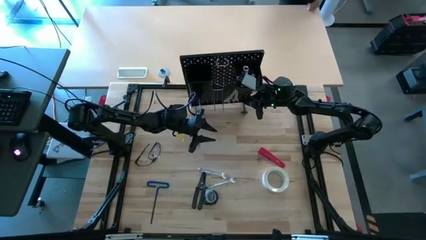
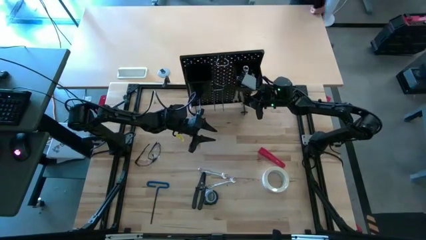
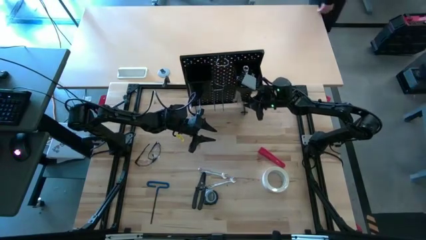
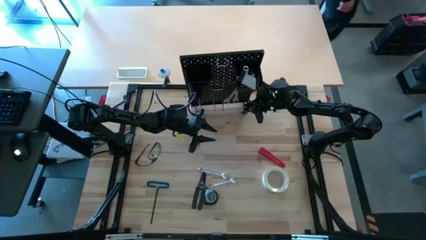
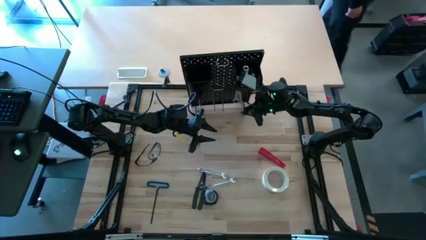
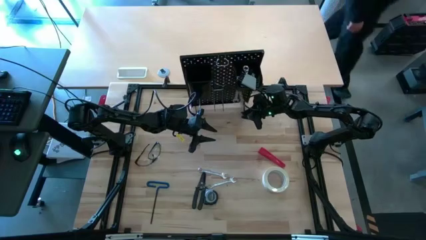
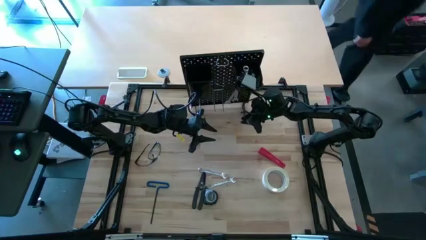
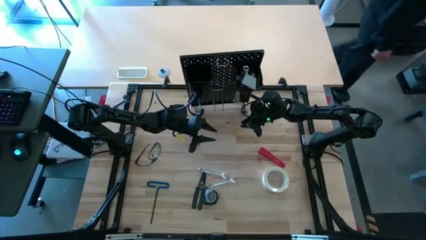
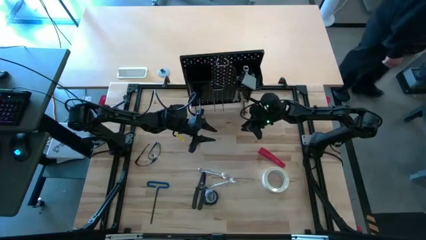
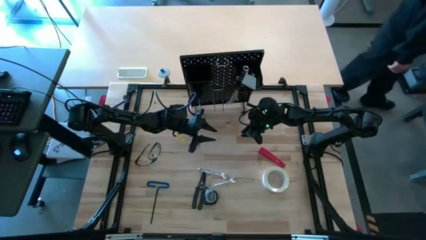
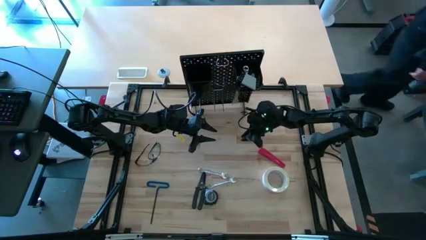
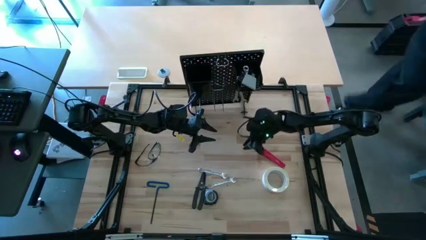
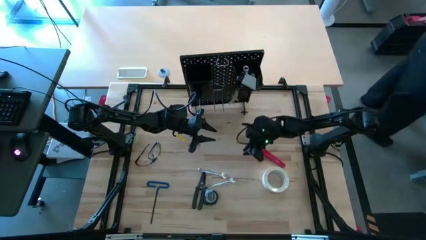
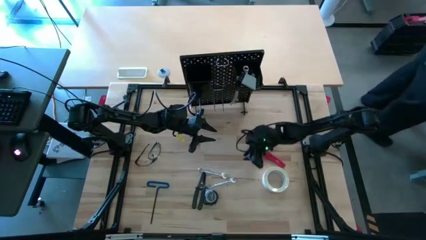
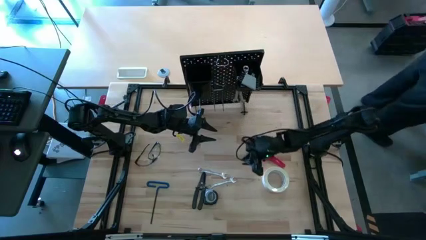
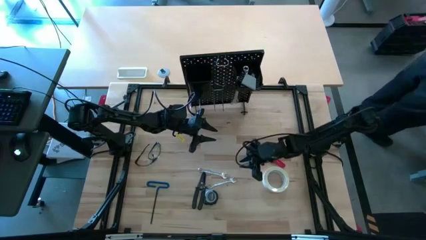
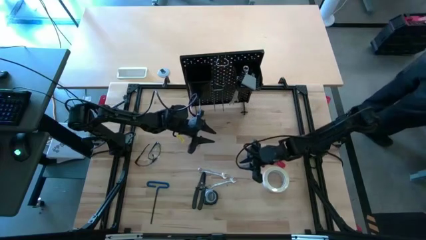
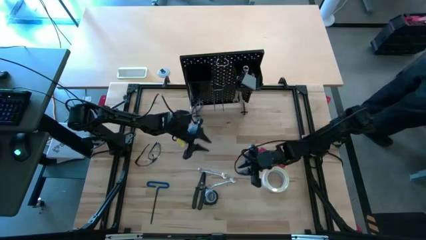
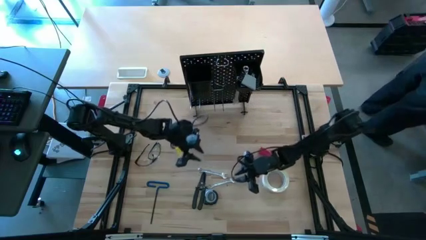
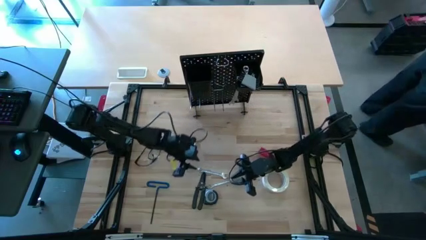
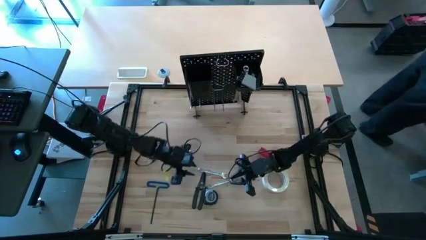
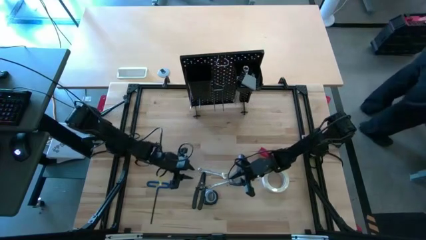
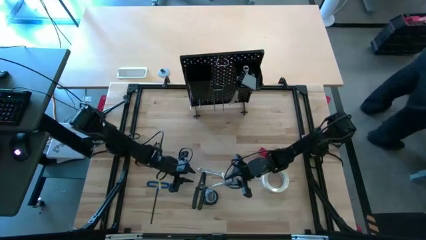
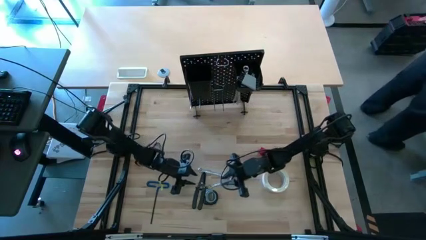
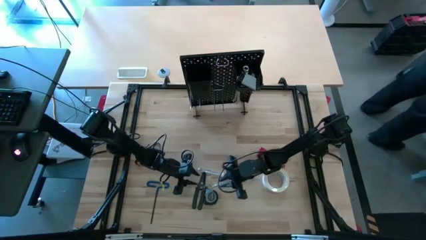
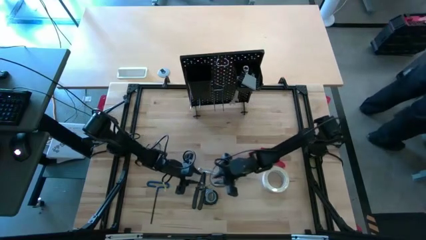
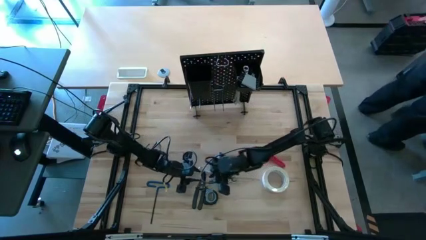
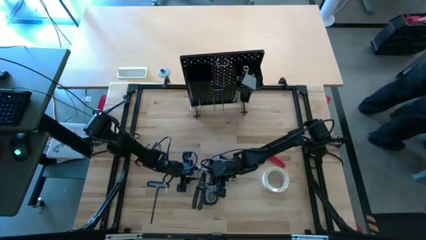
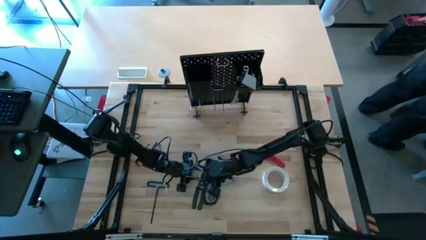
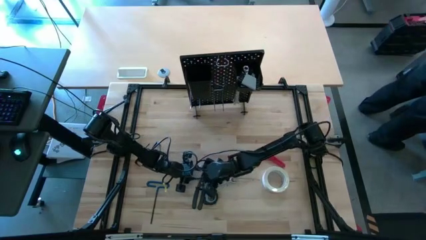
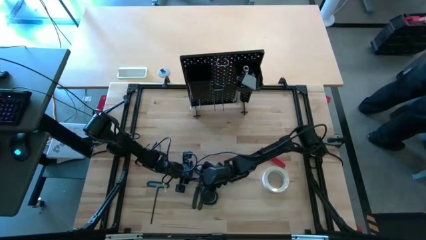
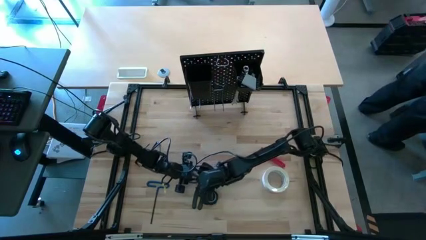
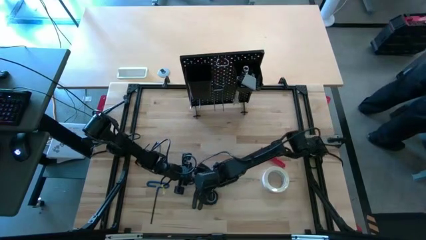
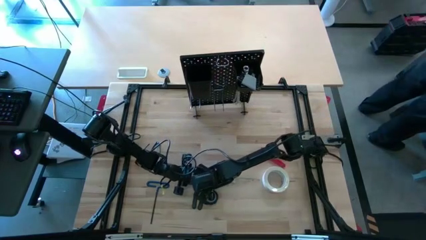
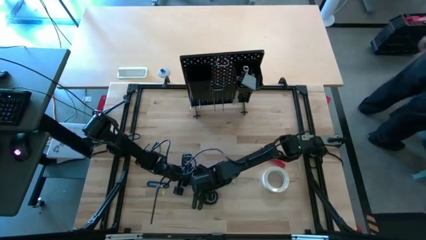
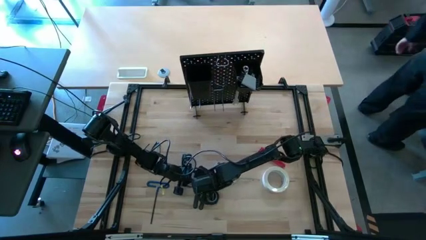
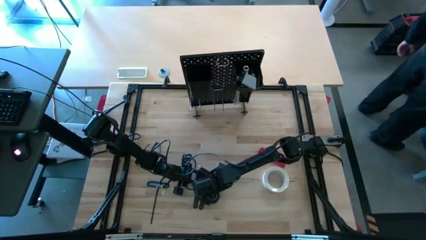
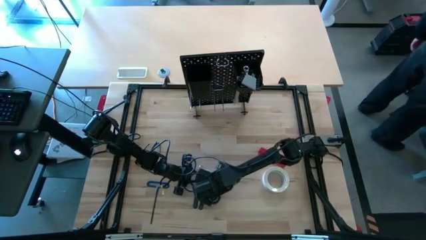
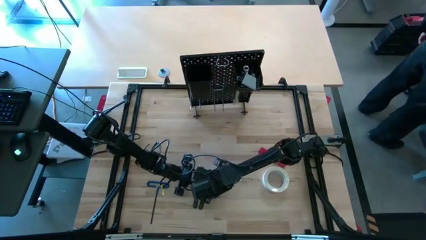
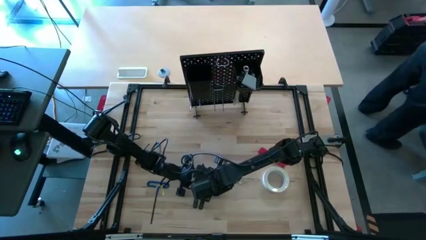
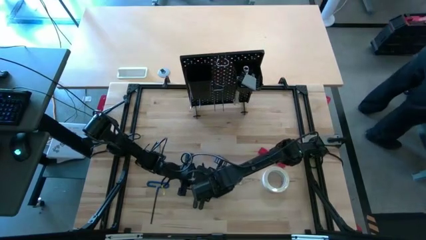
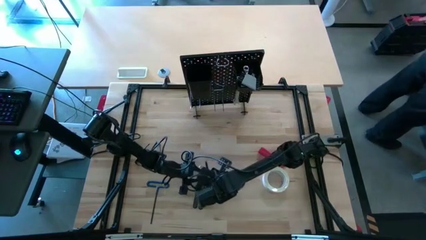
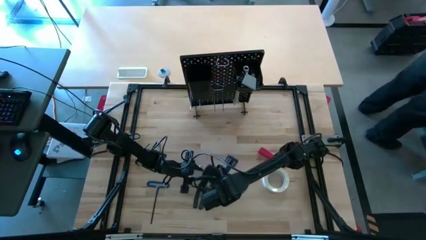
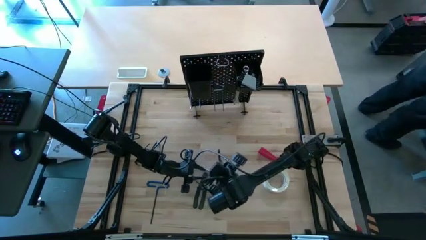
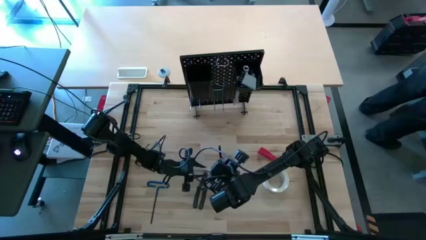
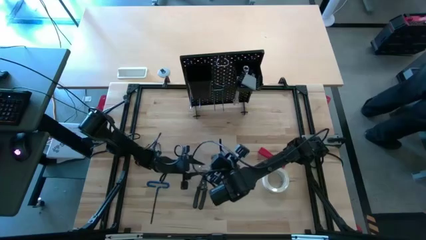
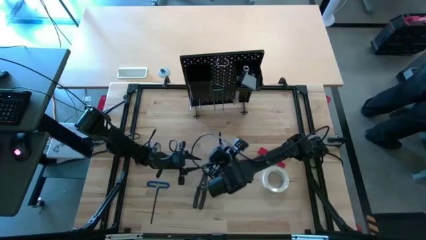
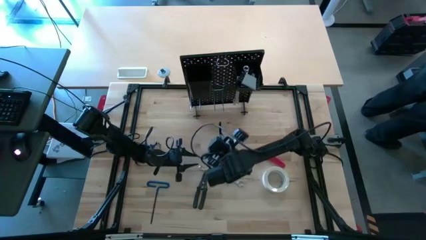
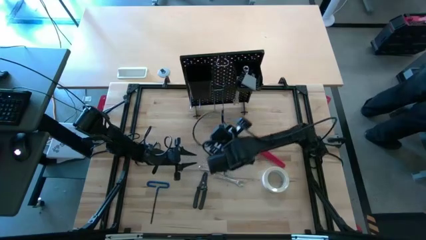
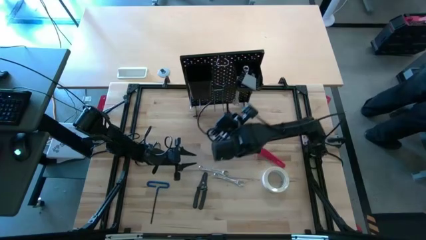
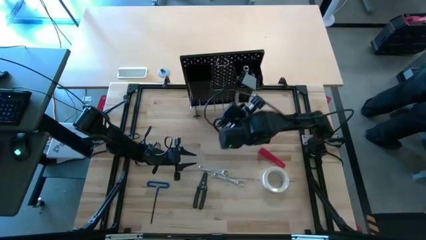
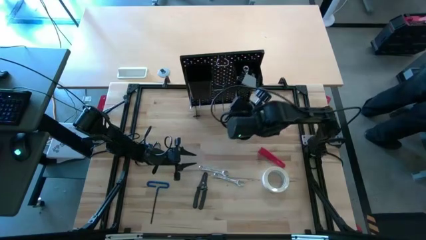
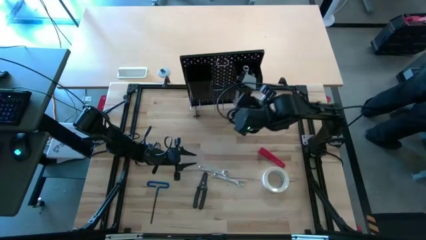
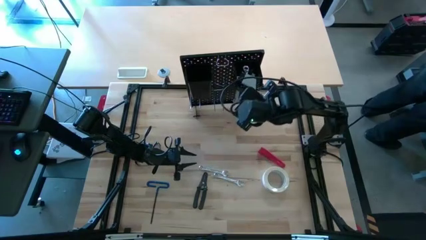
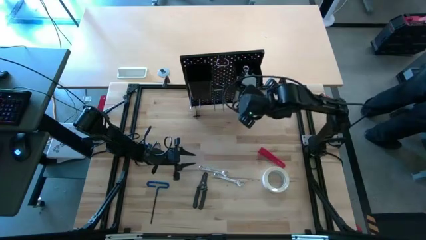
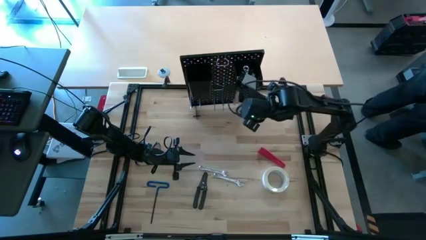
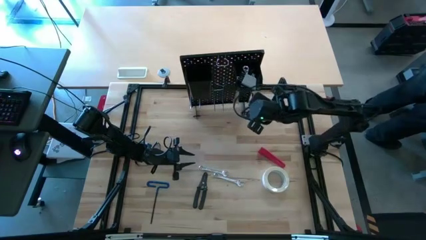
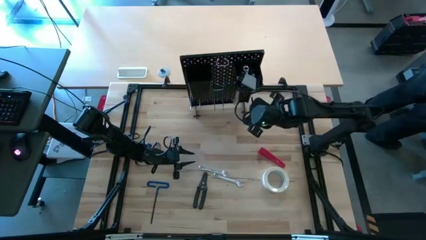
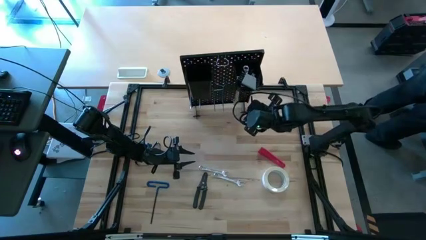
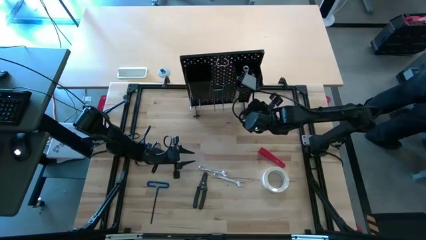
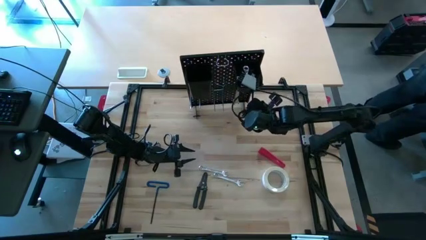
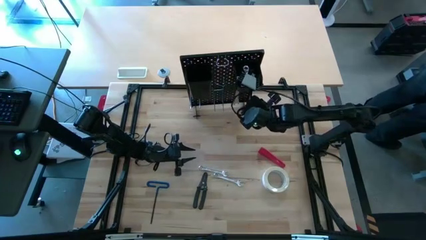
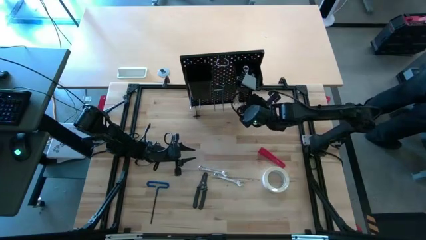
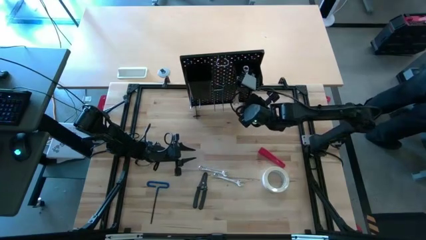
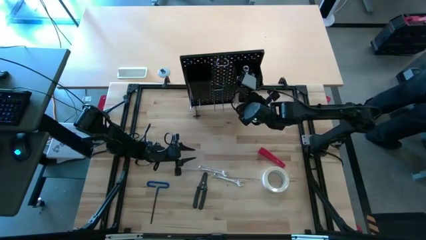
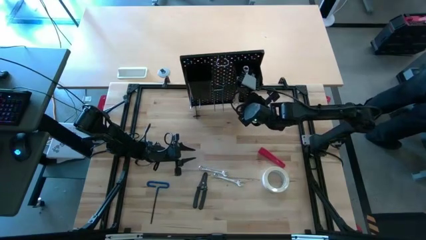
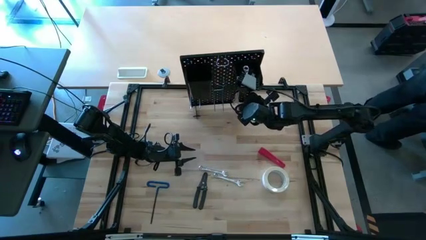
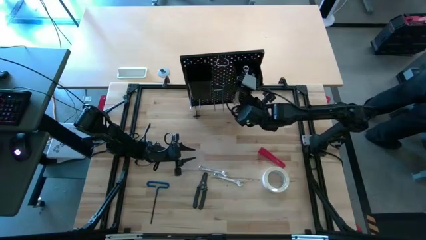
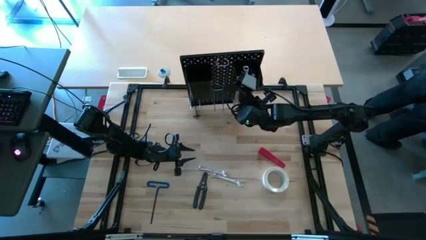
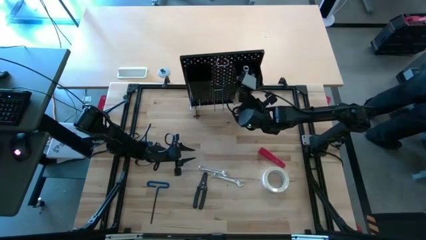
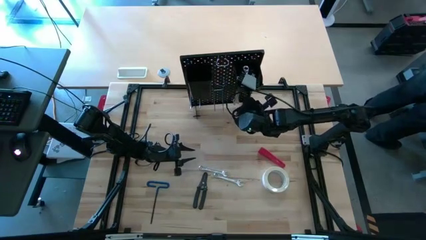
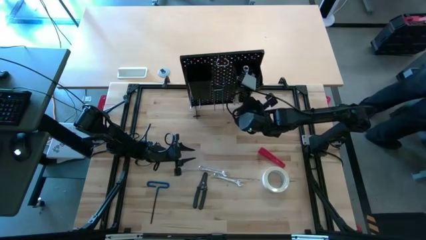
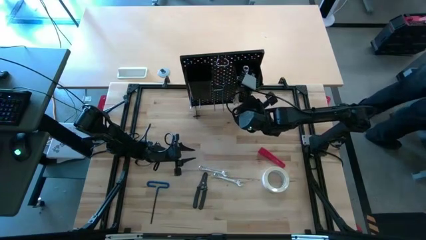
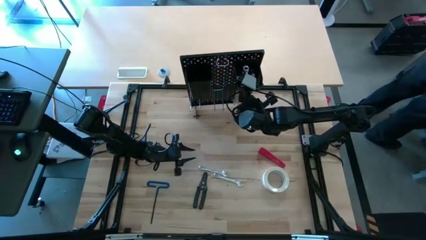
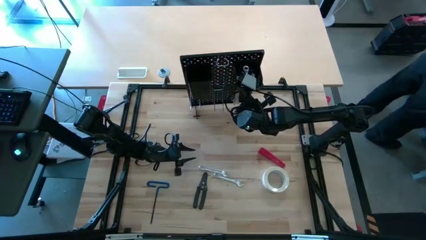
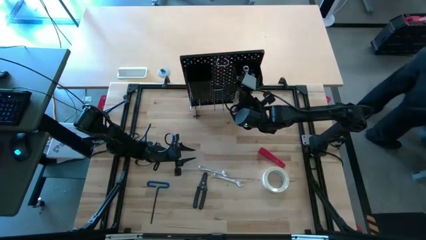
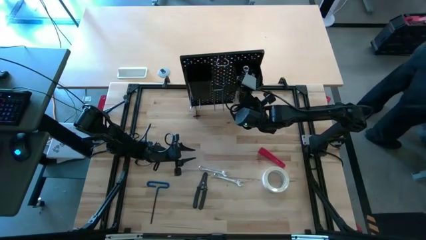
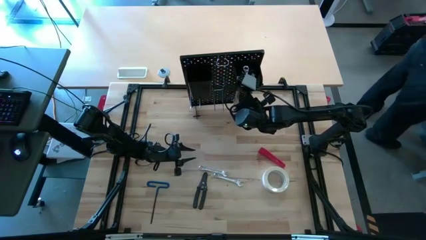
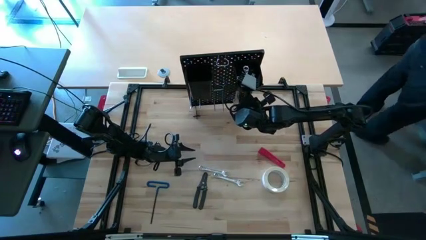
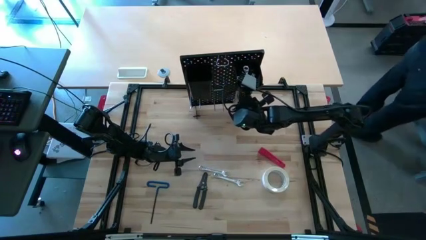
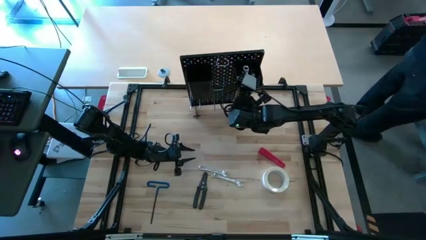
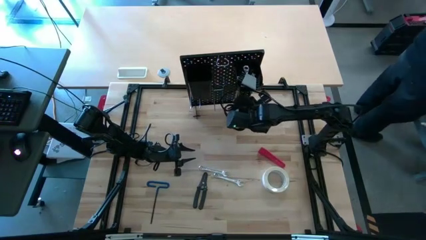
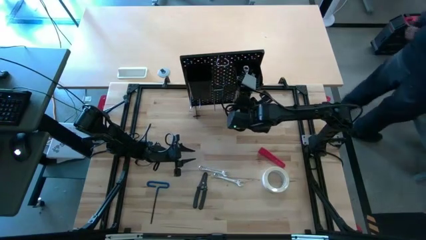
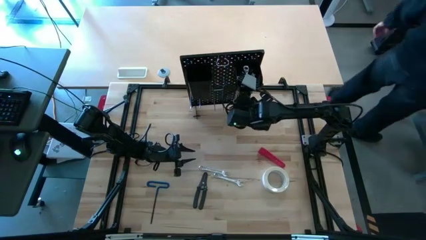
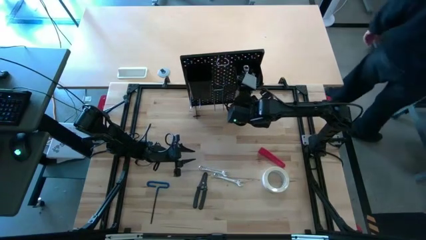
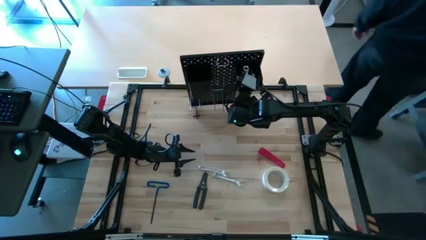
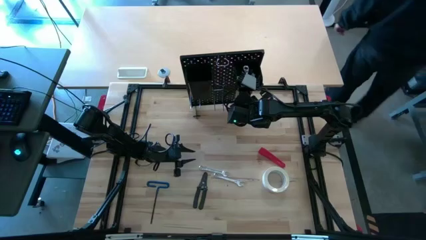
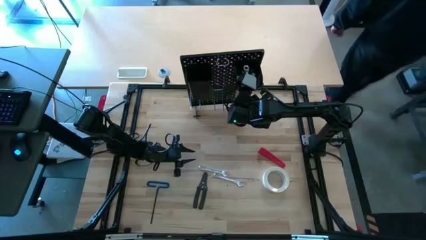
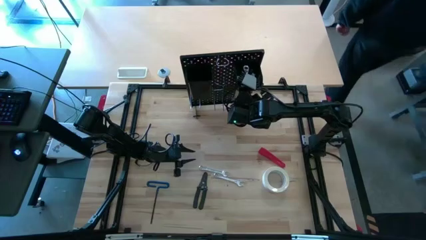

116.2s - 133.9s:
Task: Hang tools onto peg board
Hang the gray tape measure on the pegboard
